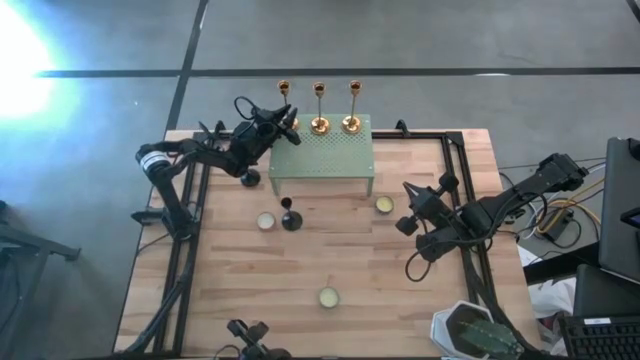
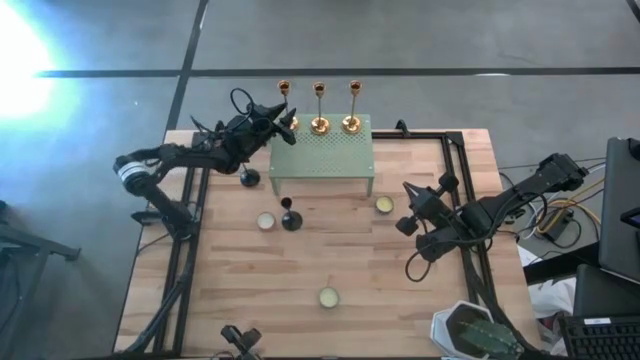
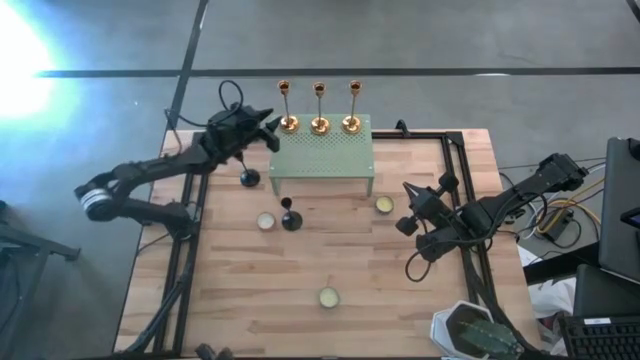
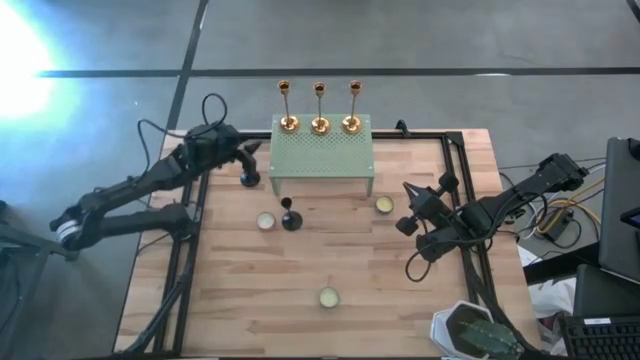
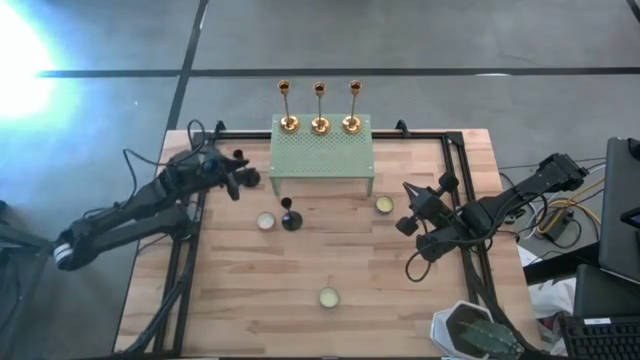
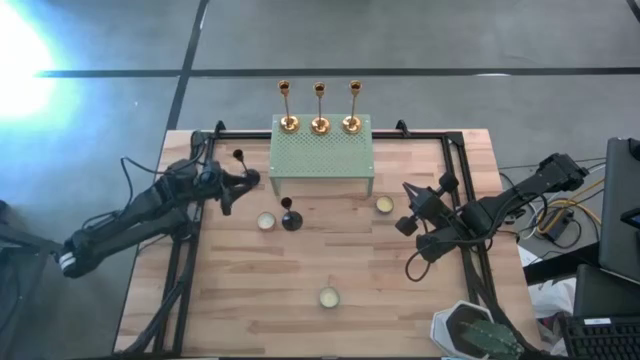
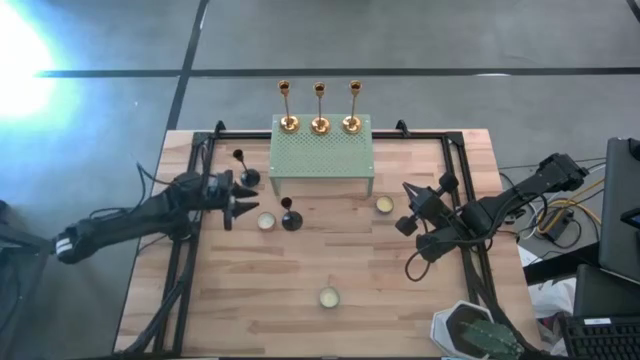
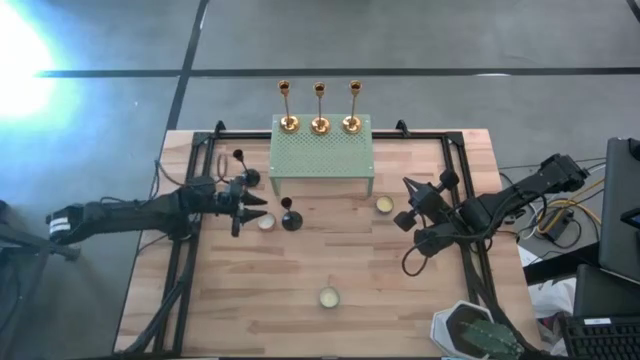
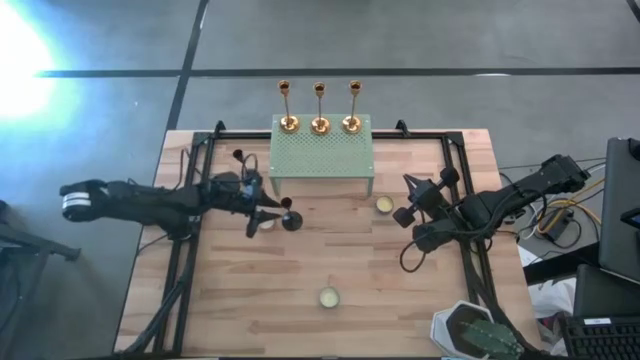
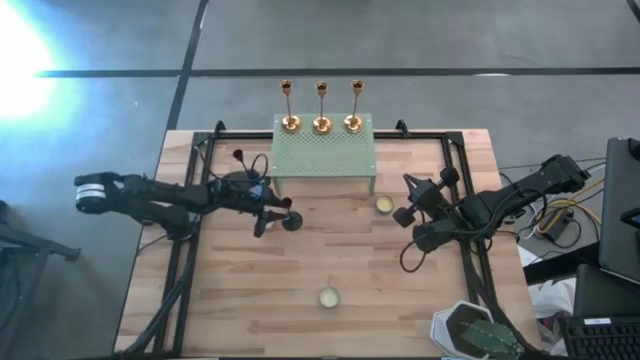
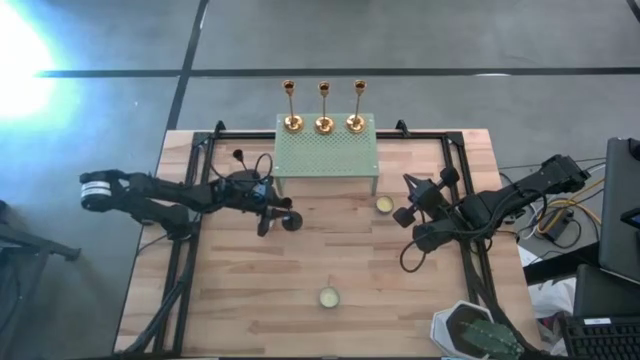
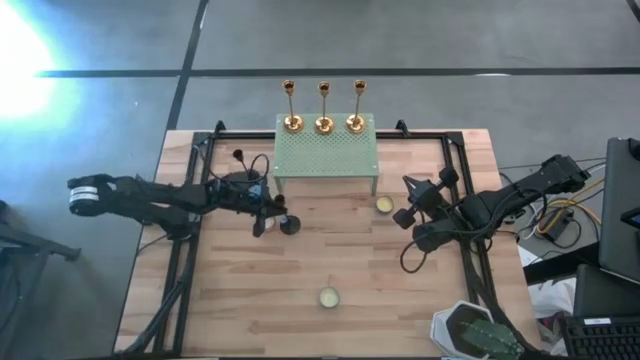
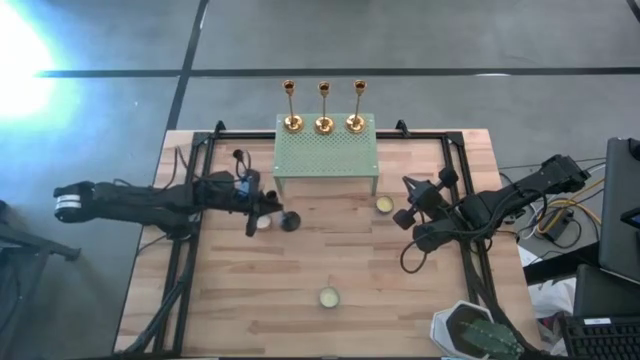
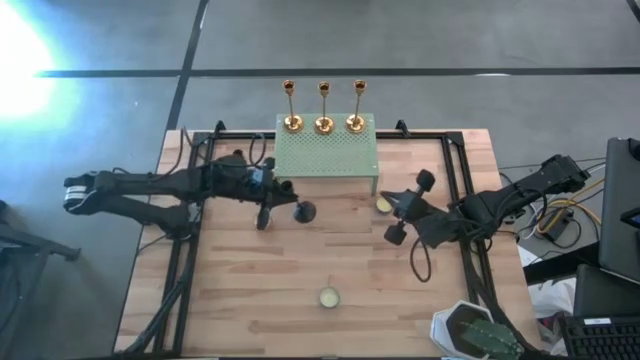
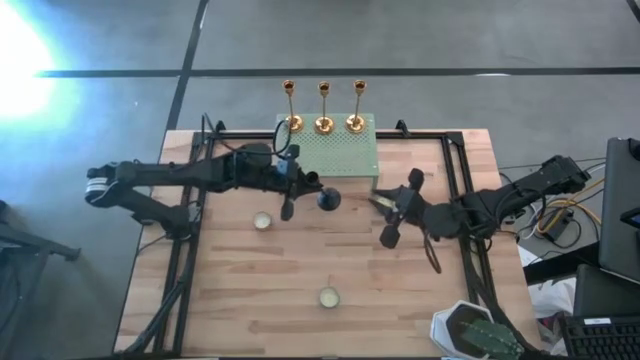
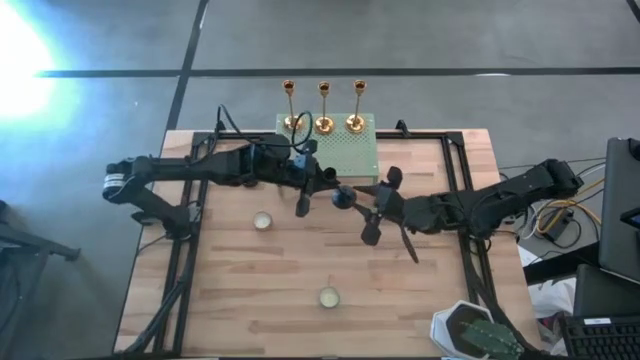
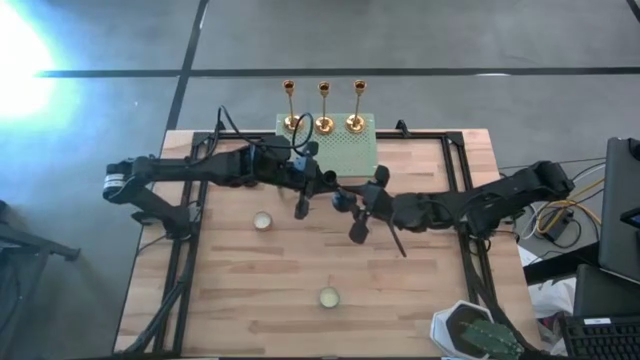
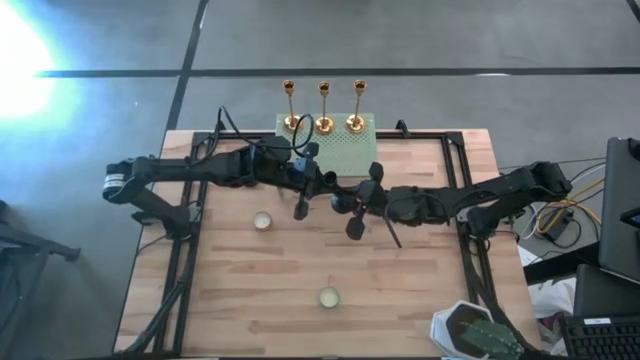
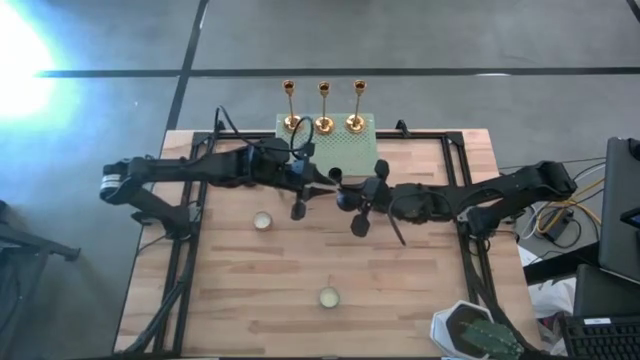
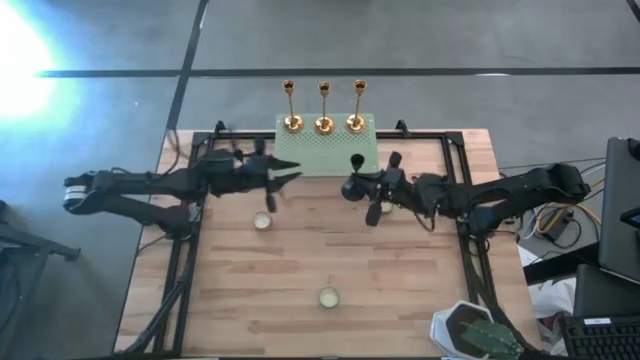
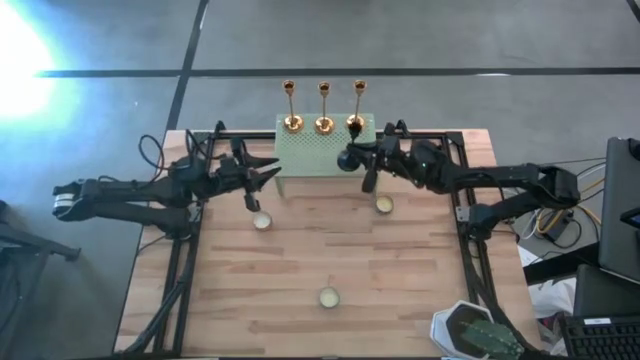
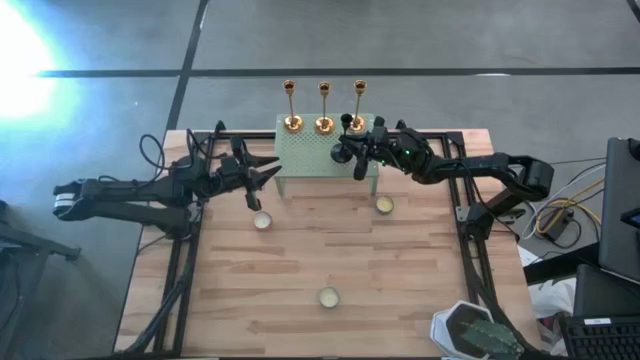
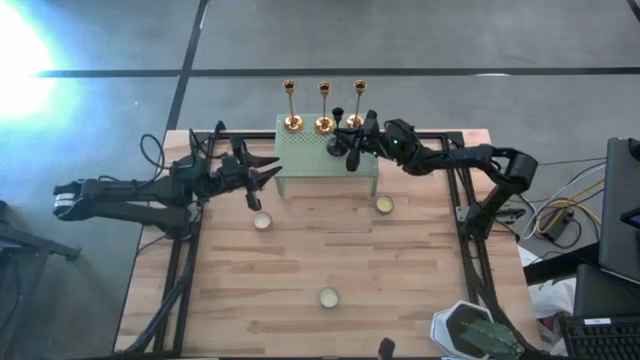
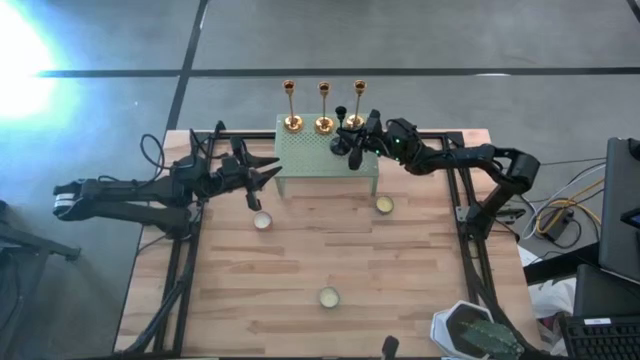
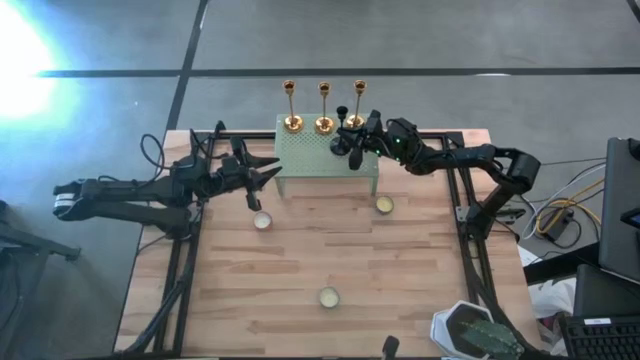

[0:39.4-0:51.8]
Task: Pick & Place candle stick holders
Put the bottom black candle holder on the shelf

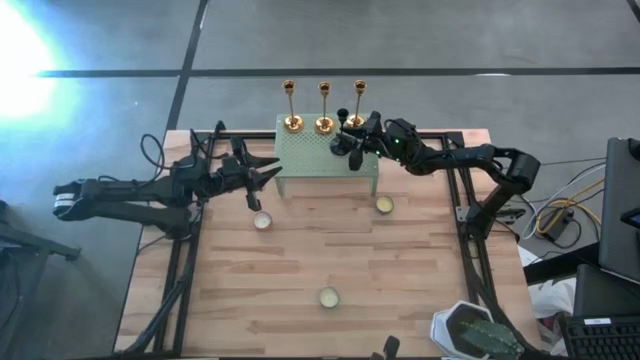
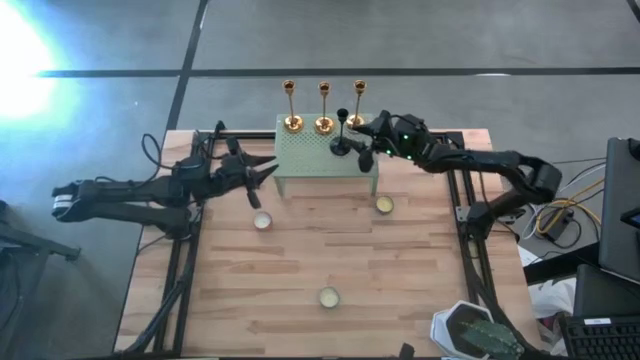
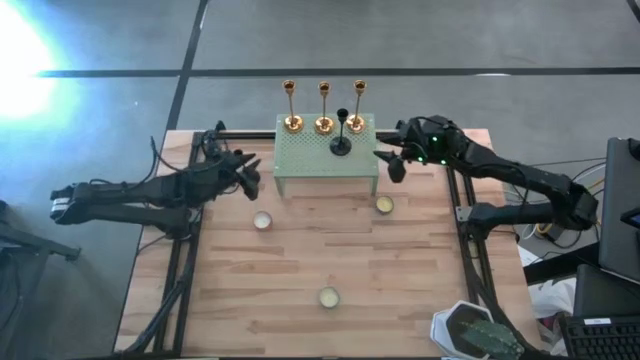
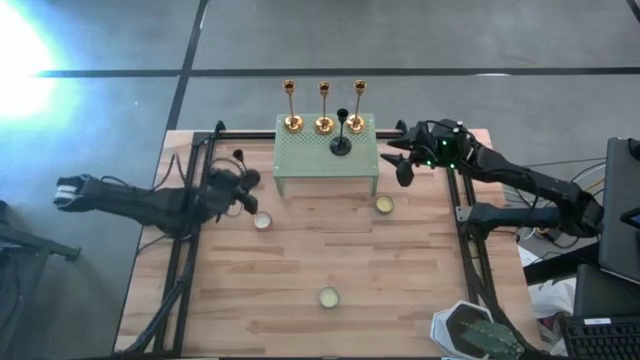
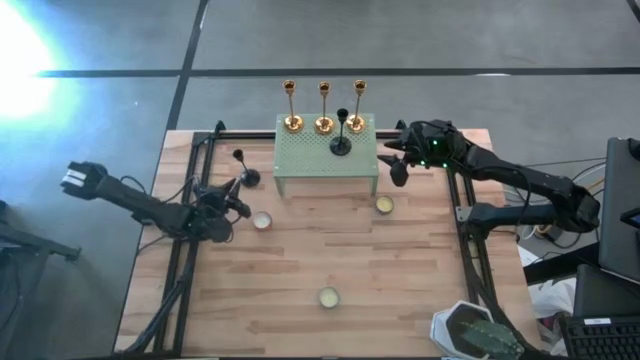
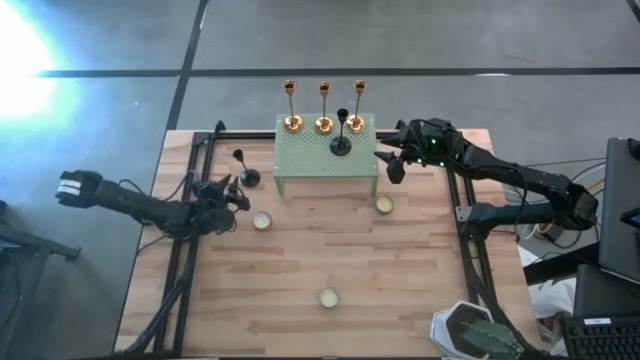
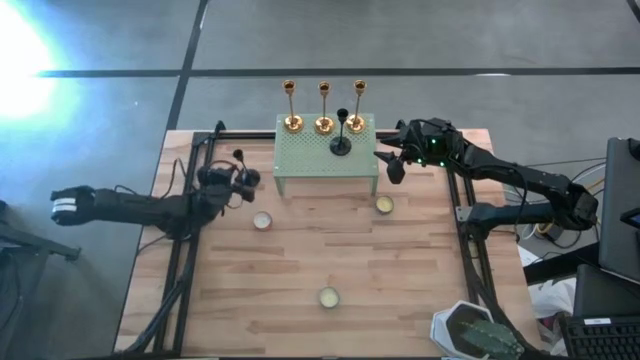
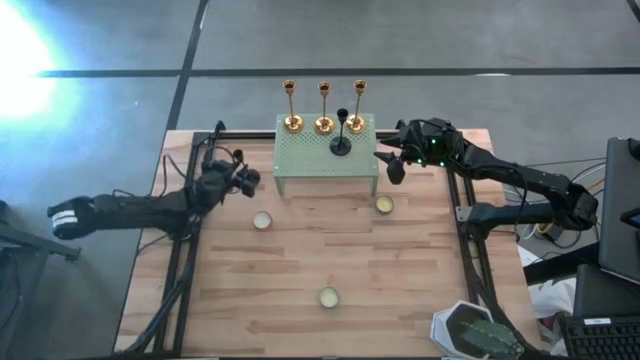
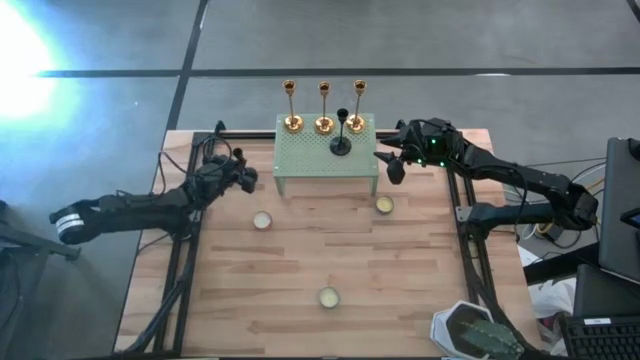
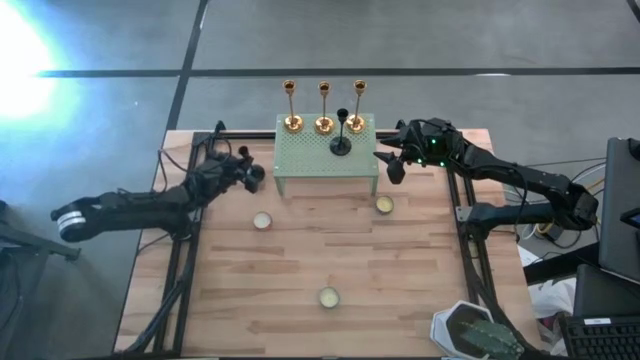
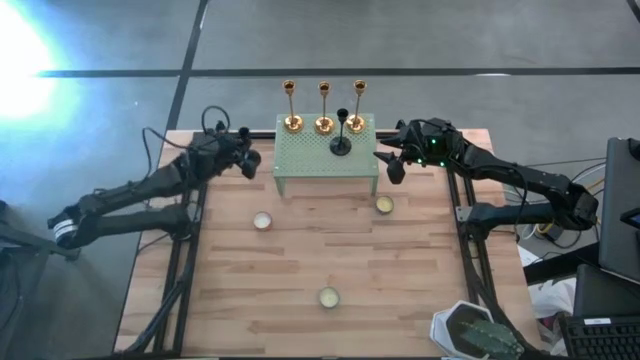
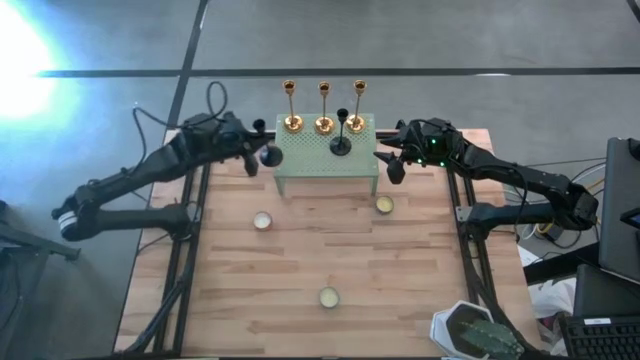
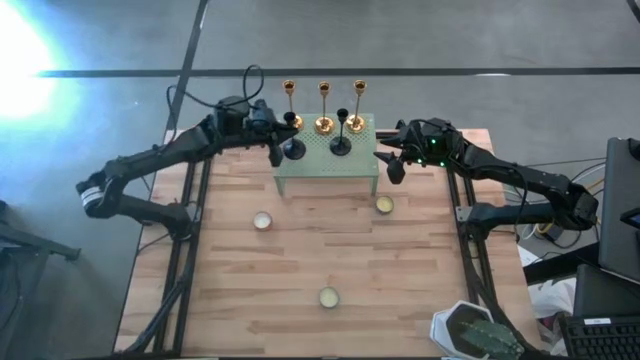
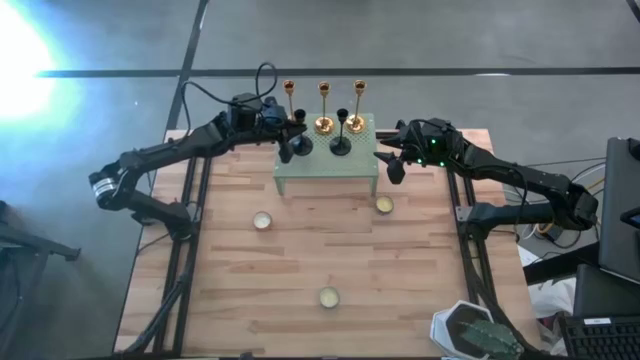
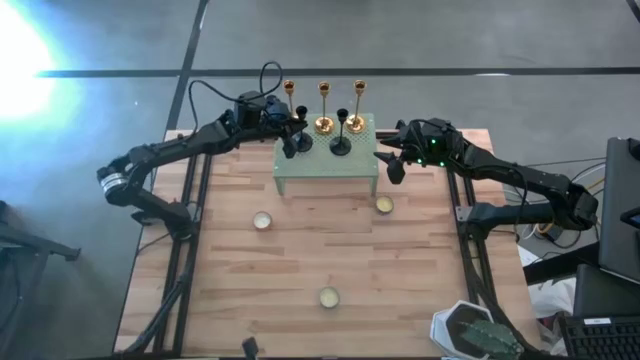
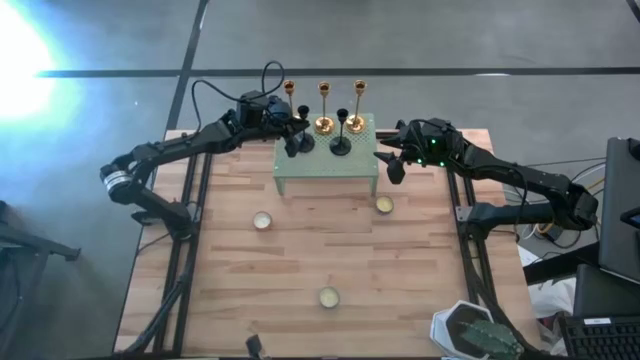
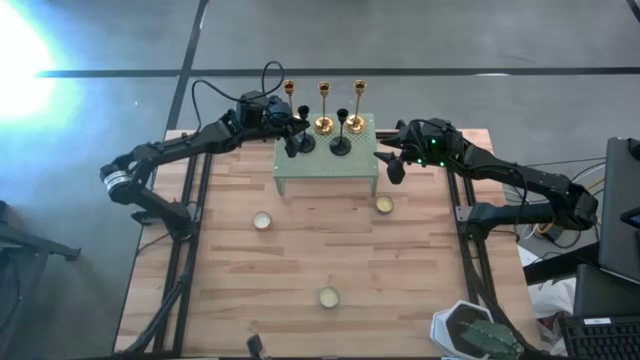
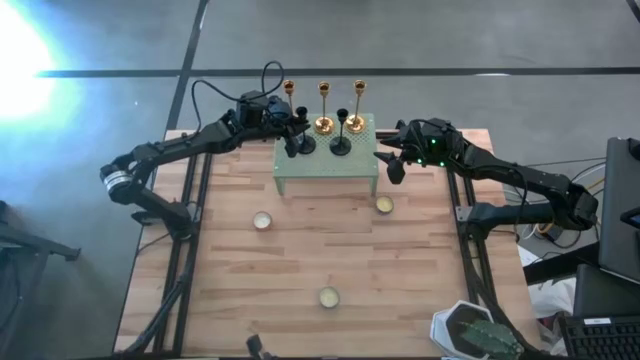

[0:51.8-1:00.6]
Align the black candle holder with the other black candle holder on the shelf
